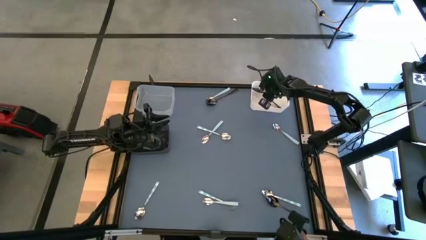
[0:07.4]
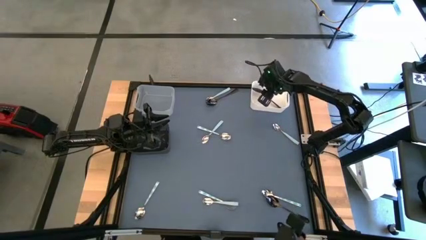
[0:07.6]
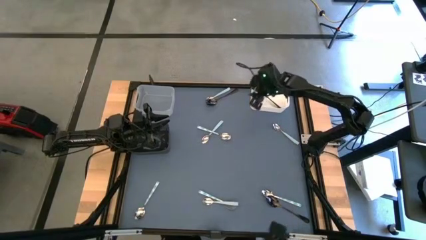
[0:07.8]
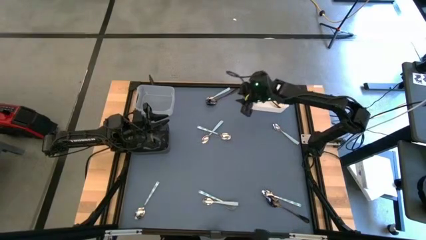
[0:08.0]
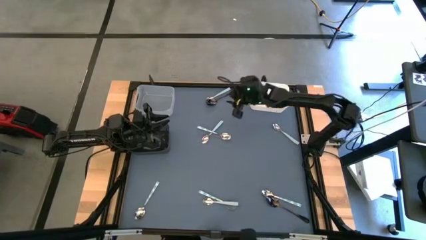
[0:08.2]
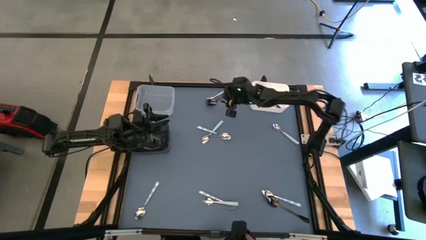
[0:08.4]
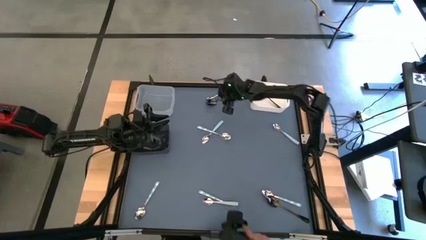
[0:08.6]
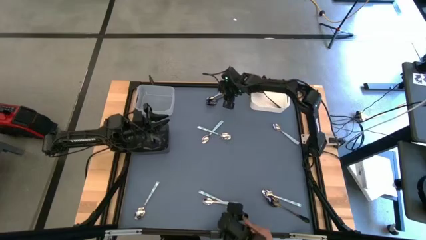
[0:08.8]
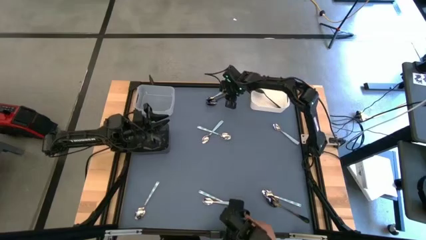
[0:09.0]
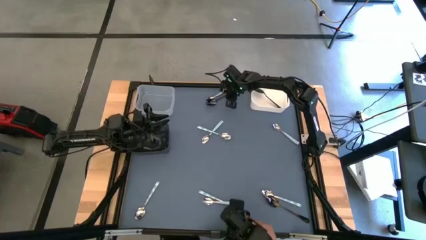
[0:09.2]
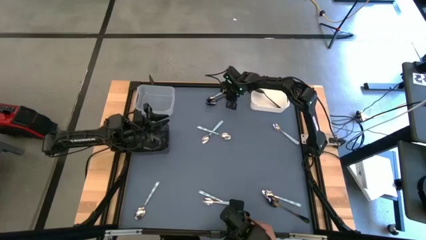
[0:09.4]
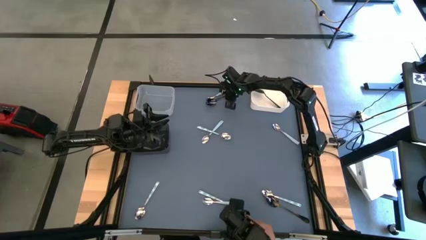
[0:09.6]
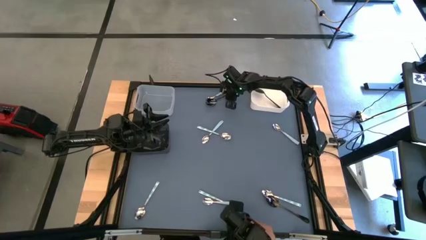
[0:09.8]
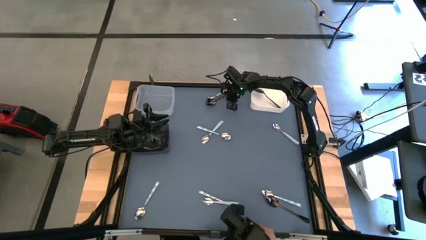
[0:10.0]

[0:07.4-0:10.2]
Task: Sort silverware by color (type)
Put the black spoon into the white bin

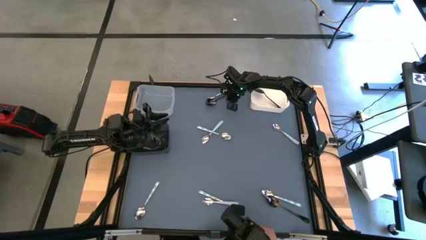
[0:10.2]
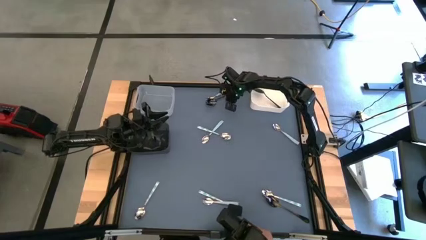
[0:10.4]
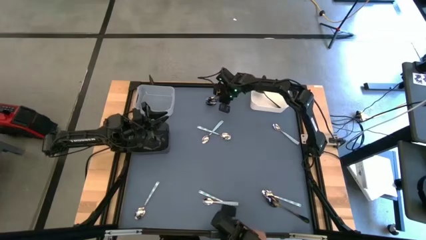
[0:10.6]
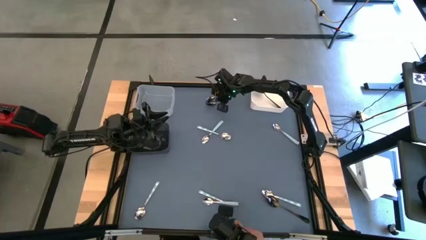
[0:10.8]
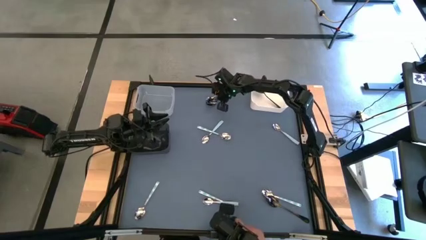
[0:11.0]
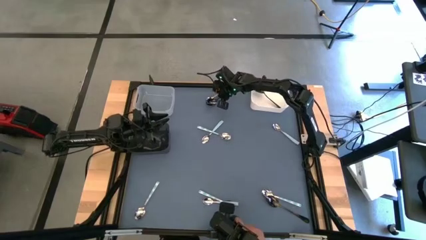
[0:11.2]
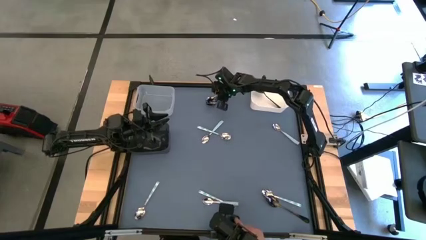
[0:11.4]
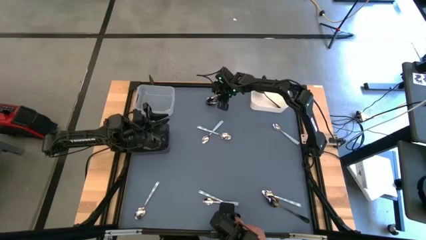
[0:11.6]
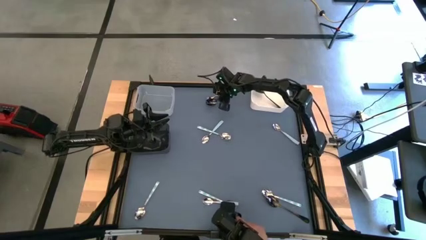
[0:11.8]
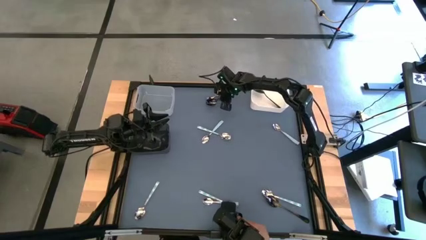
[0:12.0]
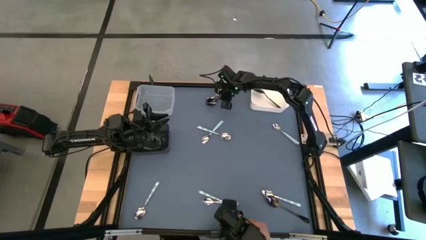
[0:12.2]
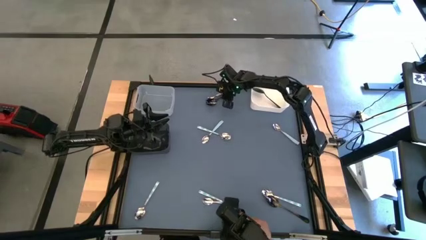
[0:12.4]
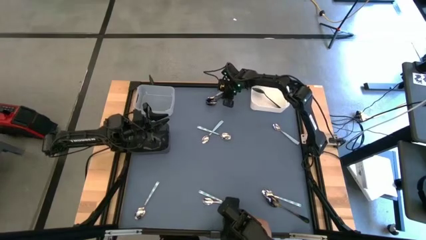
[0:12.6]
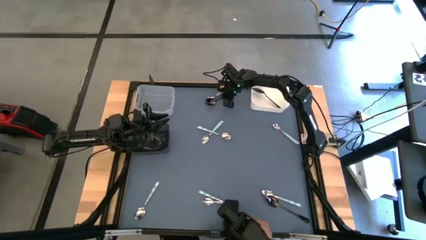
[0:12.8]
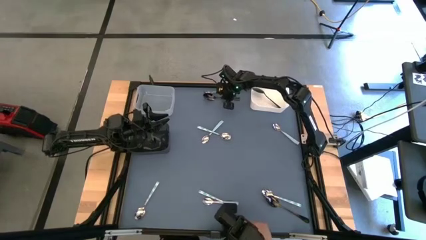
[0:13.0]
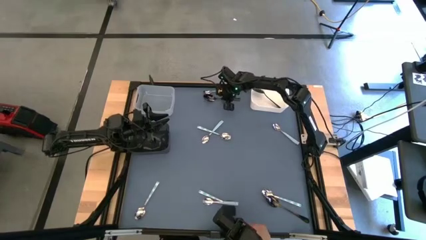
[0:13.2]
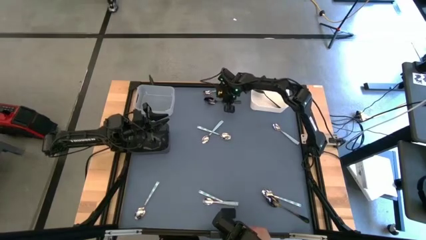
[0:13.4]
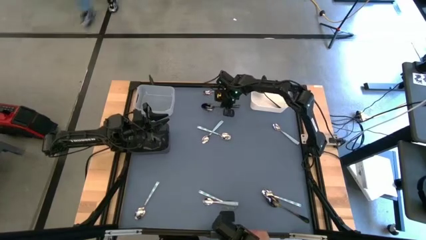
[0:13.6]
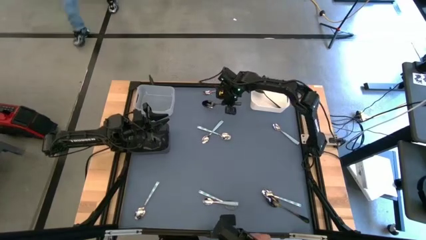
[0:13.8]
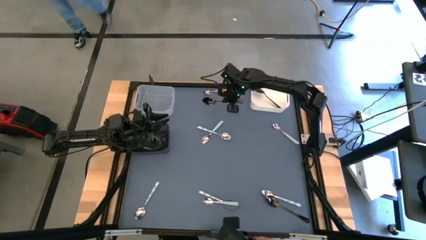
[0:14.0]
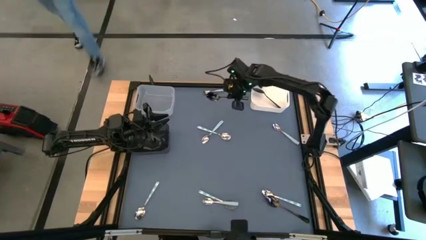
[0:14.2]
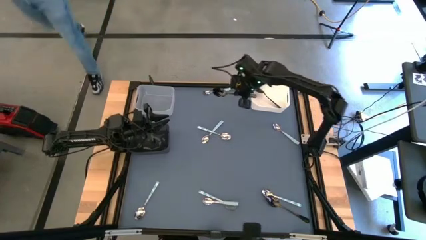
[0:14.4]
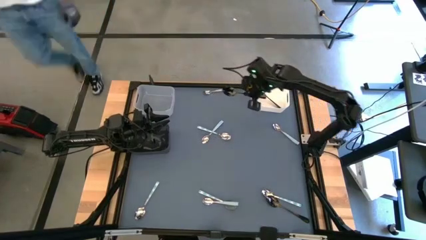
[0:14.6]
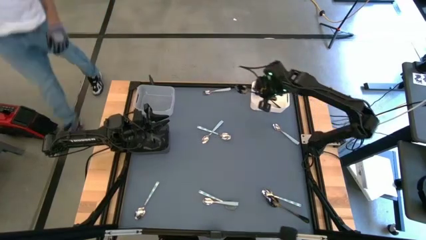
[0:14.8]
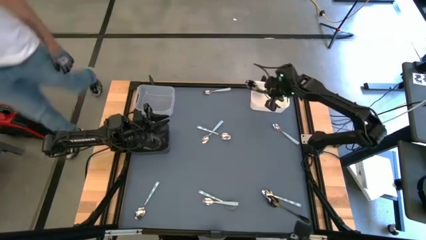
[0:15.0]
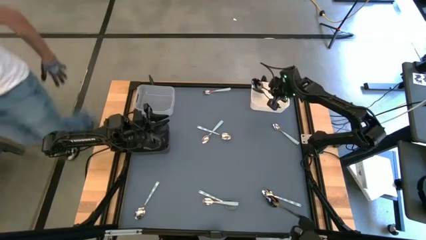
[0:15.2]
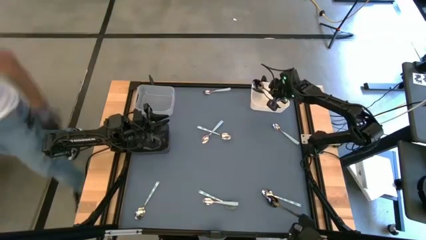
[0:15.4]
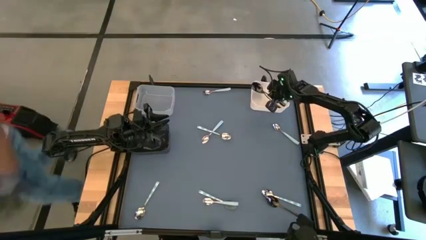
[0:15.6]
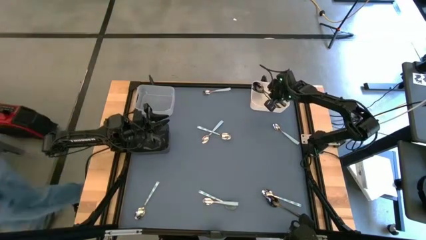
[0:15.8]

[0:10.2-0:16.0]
Put the black spoon into the white bin

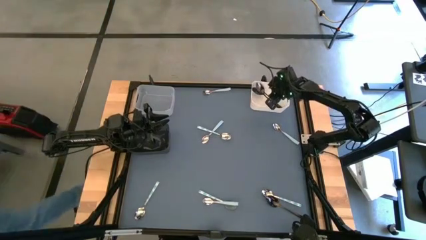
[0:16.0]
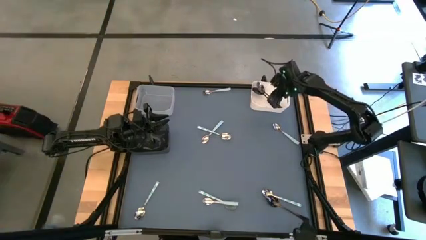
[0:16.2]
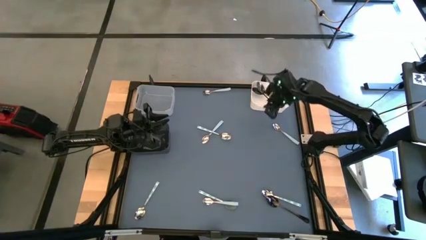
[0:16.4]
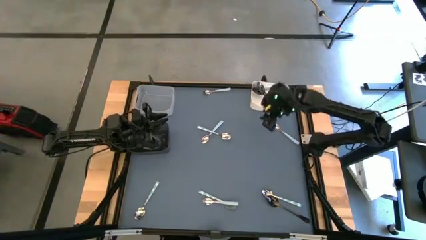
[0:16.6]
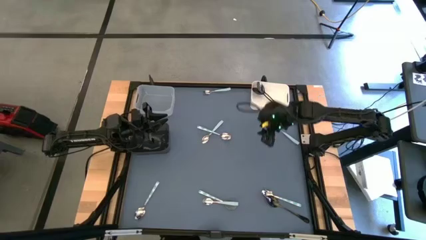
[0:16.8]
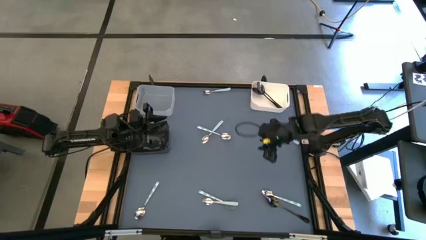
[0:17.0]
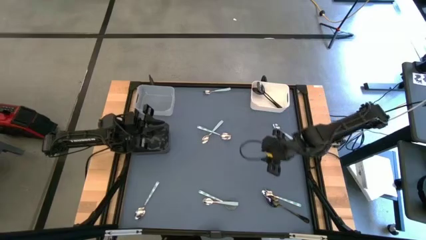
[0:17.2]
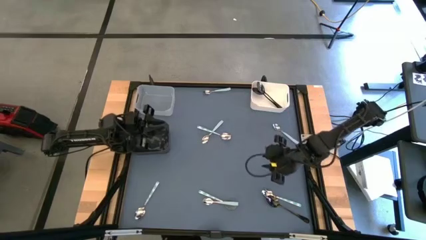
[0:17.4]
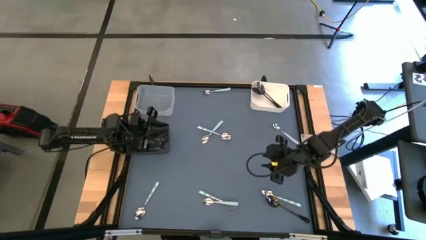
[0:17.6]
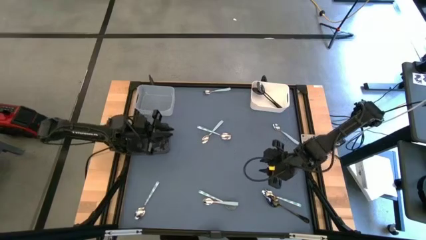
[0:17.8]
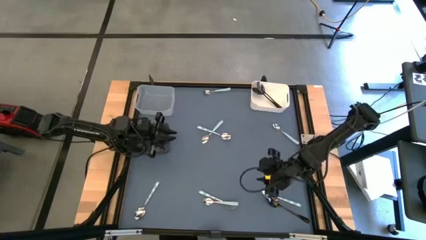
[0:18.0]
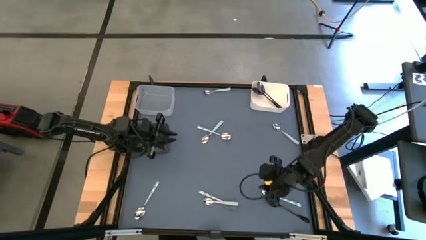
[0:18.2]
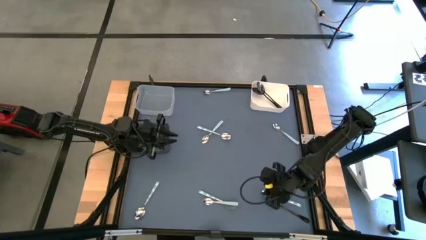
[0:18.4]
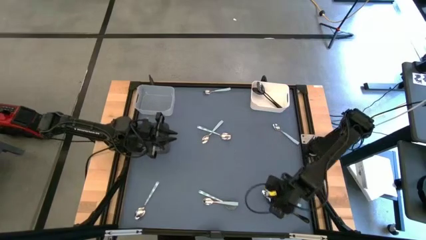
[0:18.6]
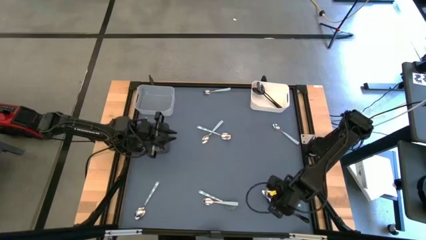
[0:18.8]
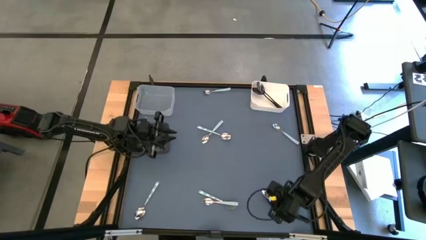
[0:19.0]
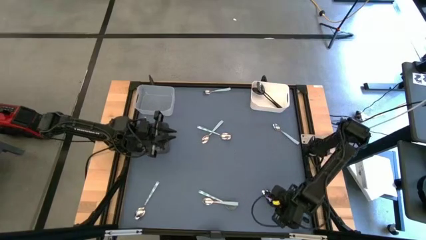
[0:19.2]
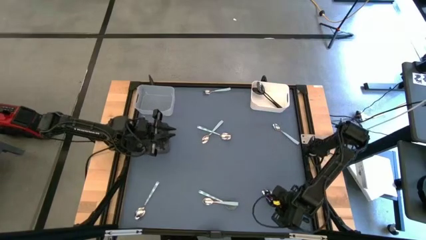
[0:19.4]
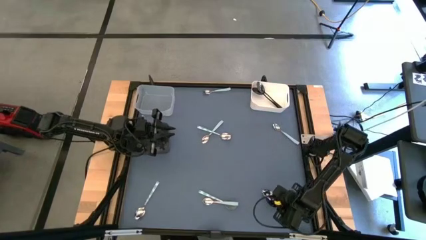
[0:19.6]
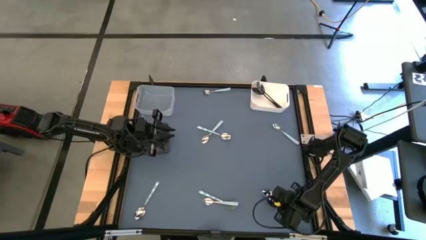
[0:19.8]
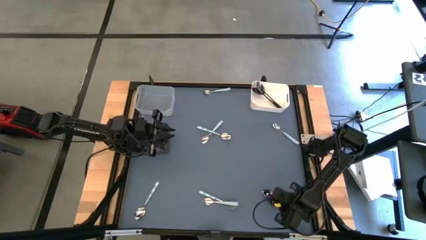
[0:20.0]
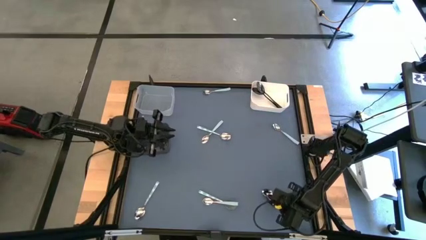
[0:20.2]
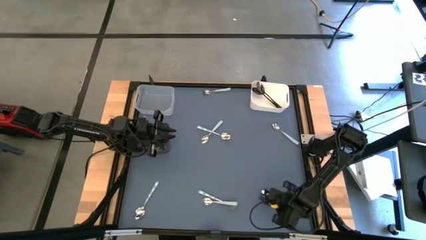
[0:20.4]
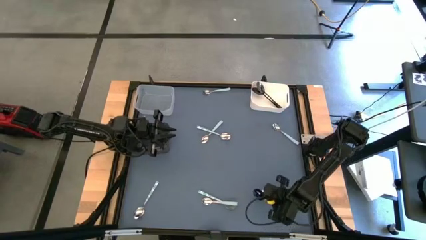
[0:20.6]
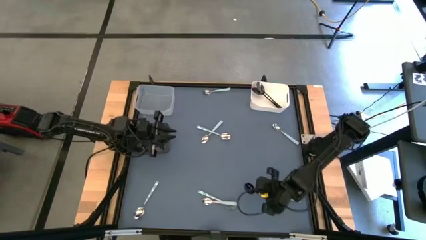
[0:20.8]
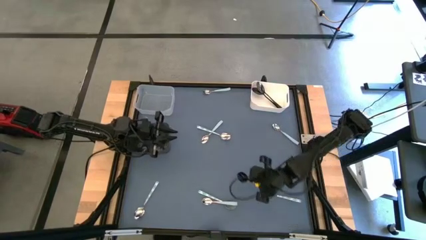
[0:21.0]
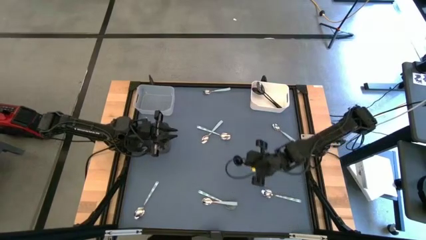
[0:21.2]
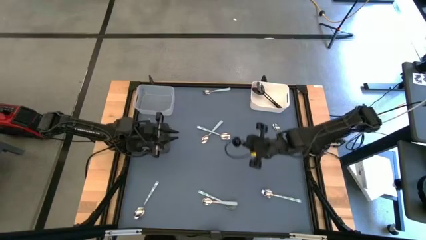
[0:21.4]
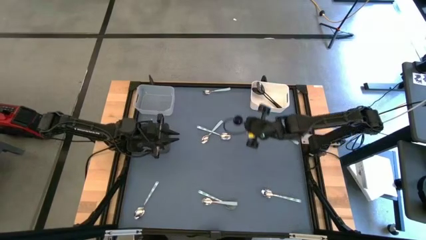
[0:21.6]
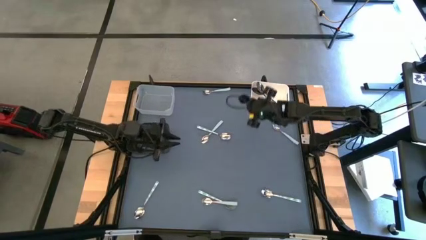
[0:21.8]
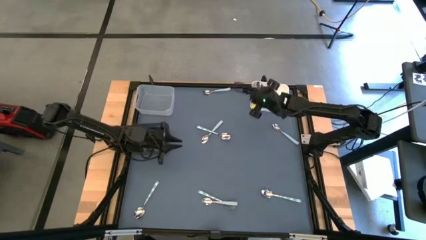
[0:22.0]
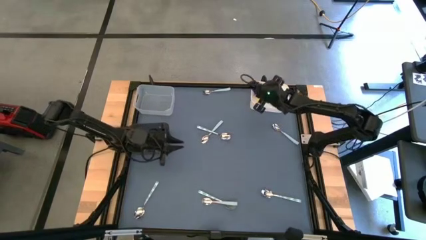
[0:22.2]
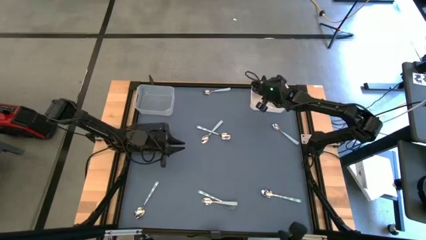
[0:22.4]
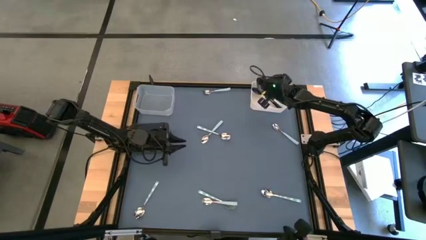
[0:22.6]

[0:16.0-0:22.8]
Put the black spoon into the white bin

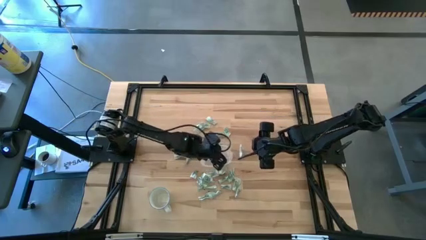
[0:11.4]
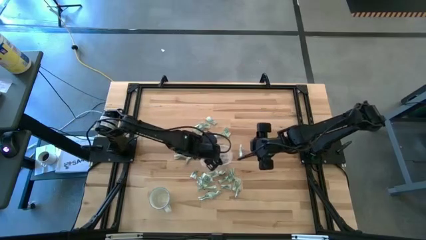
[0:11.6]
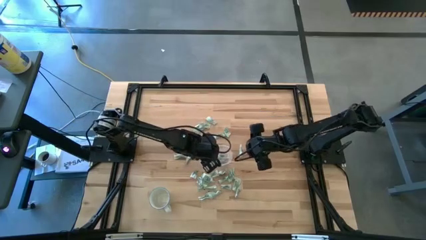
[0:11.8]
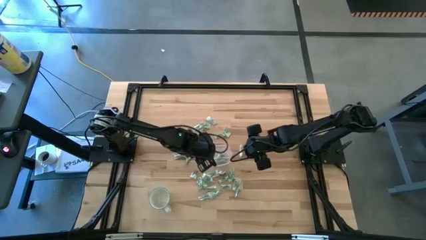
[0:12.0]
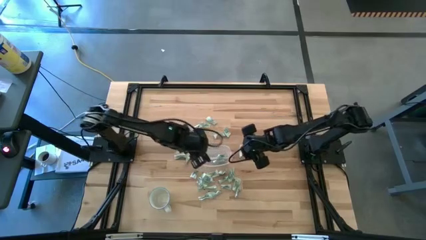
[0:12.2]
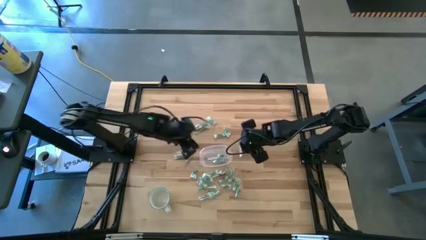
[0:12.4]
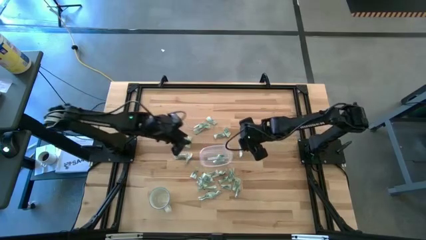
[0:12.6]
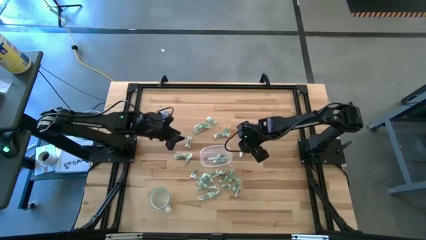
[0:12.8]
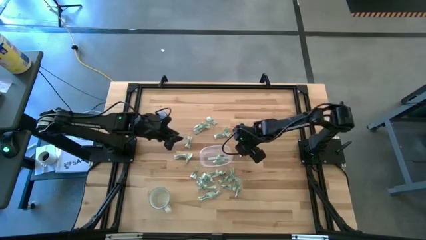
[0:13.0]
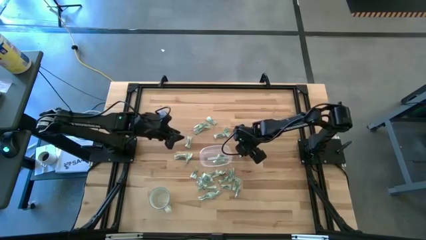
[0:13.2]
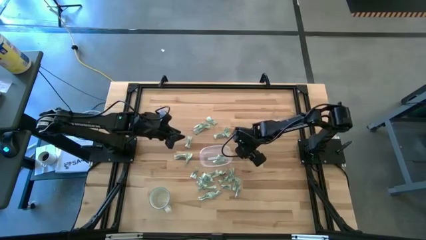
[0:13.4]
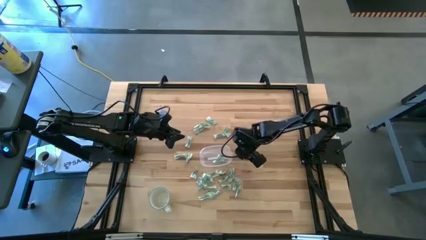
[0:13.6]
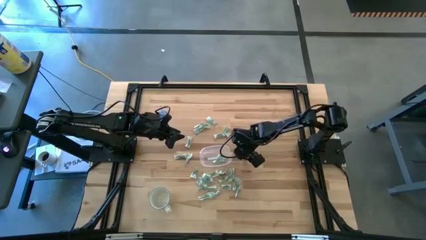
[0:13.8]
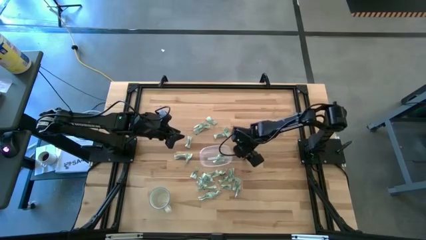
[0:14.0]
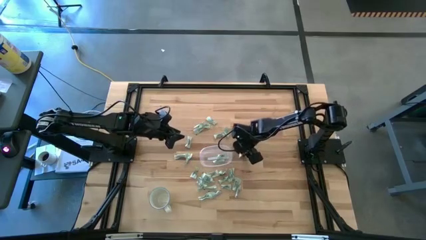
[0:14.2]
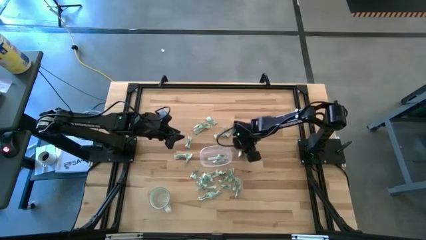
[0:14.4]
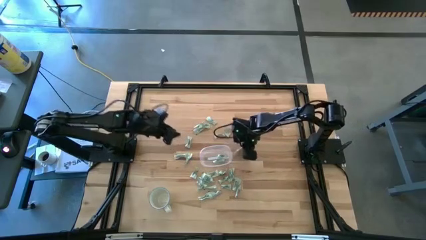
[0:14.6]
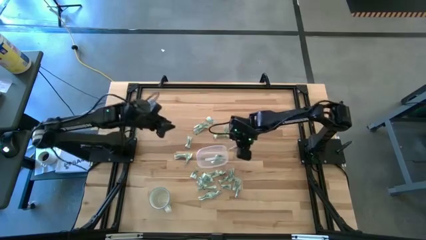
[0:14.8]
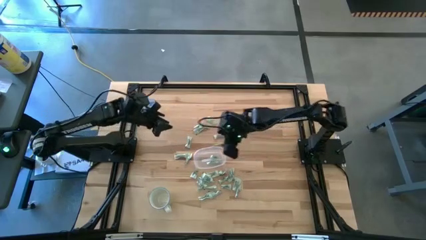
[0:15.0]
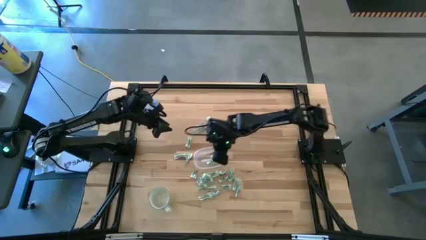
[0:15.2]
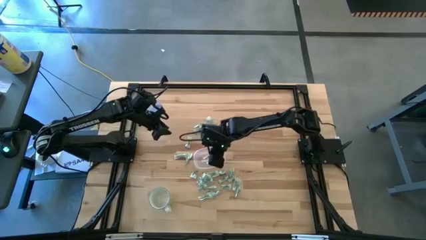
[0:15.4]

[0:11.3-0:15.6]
Task: Pick and place Stevia / Truvia into bins
Put the stevia packet into the transparent container
